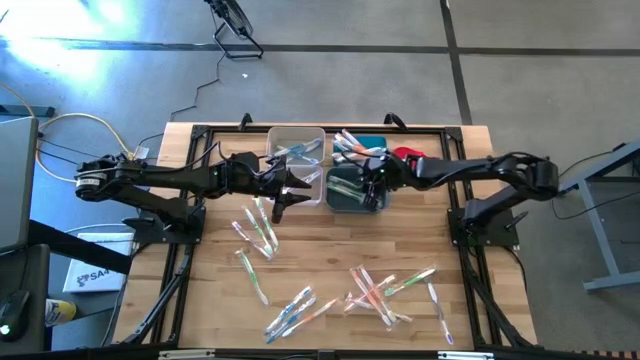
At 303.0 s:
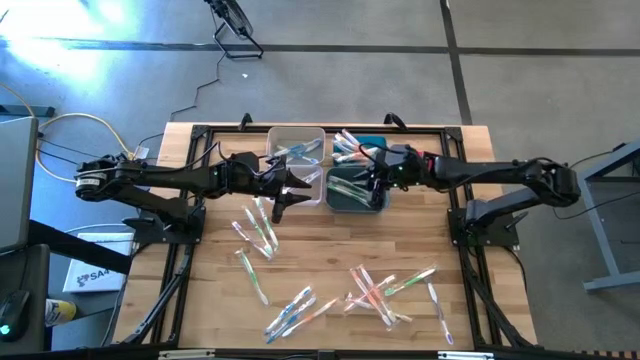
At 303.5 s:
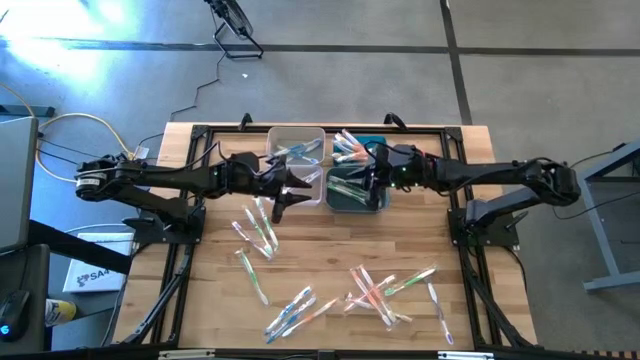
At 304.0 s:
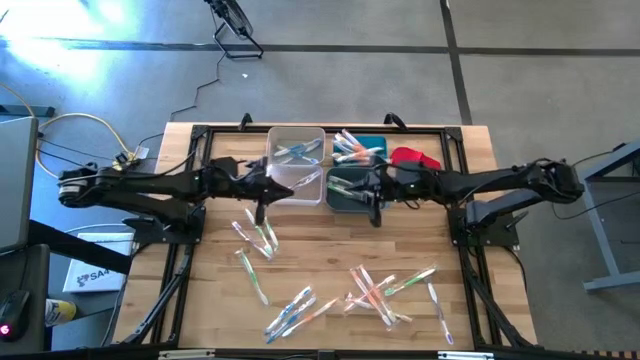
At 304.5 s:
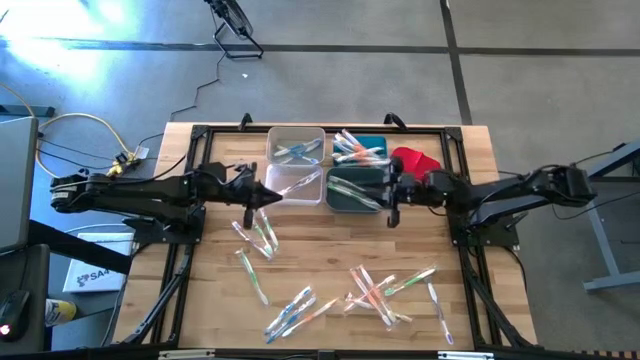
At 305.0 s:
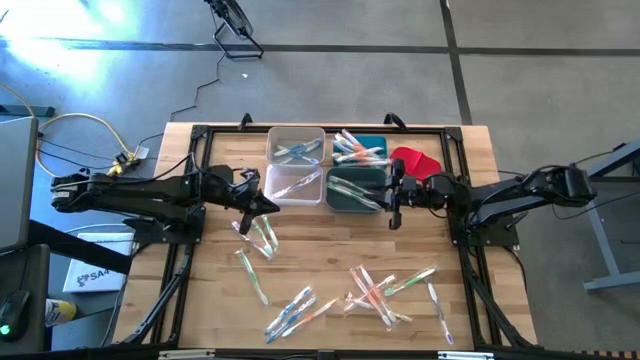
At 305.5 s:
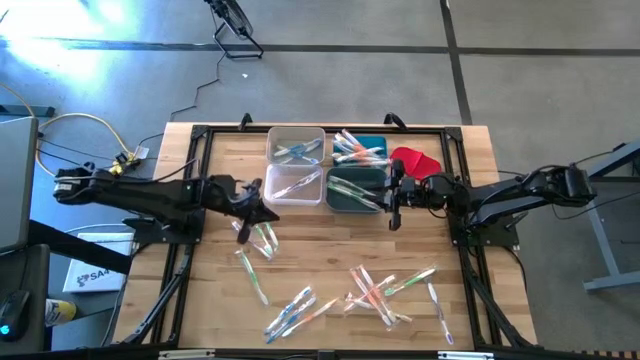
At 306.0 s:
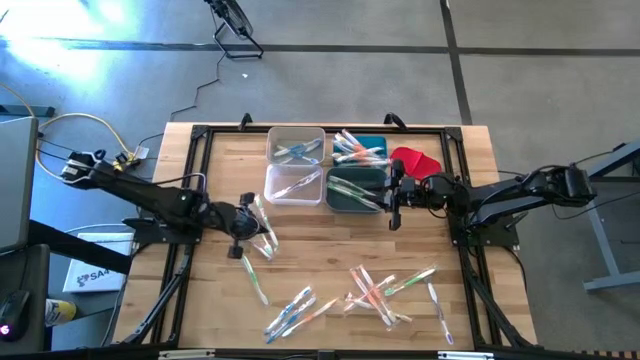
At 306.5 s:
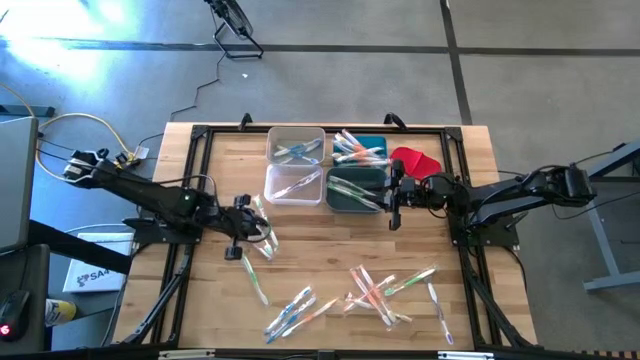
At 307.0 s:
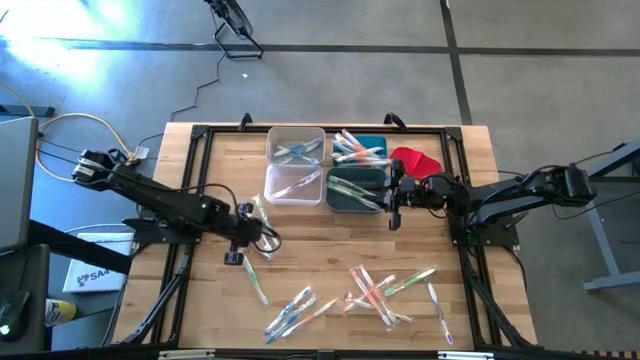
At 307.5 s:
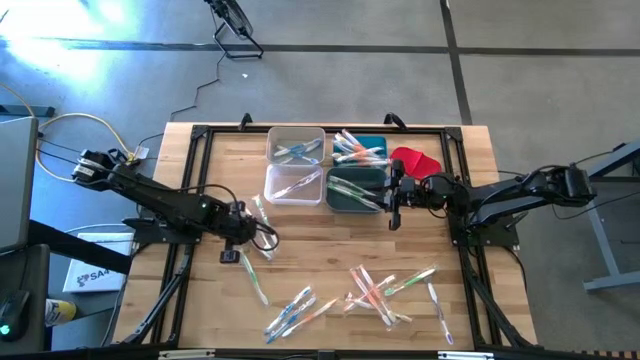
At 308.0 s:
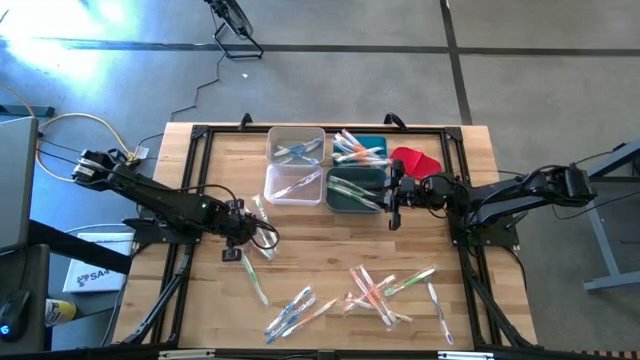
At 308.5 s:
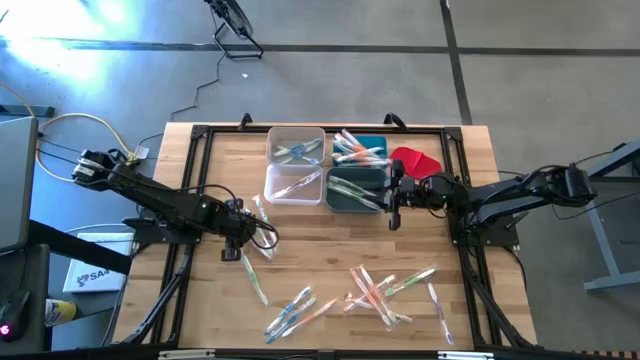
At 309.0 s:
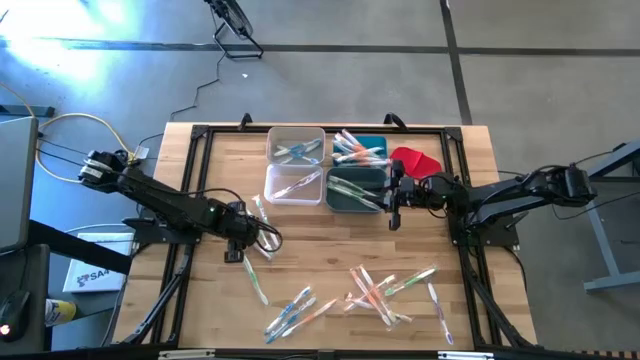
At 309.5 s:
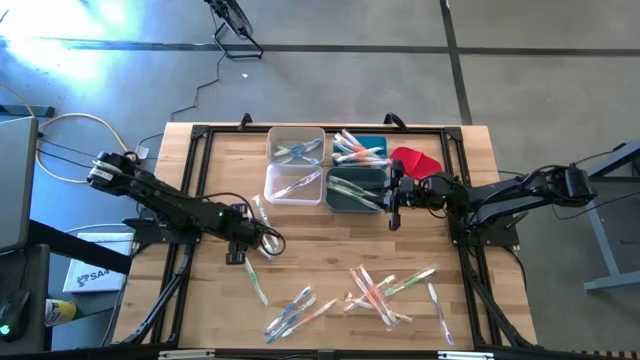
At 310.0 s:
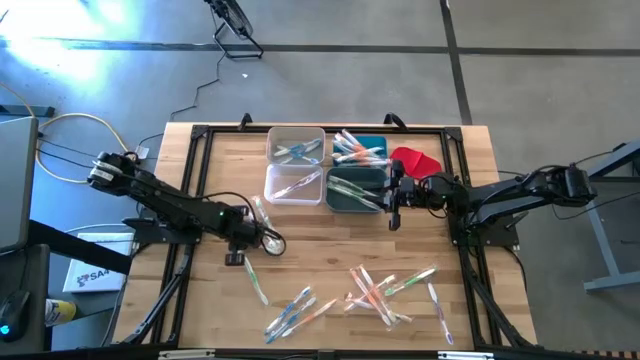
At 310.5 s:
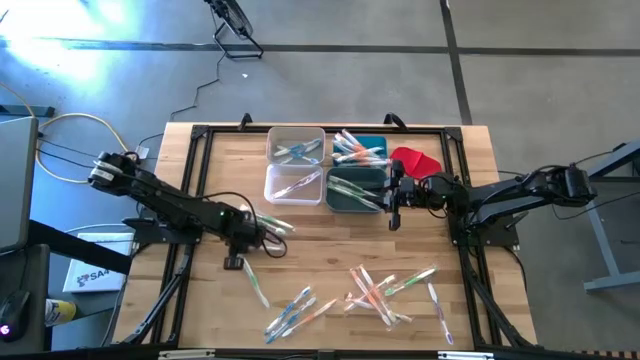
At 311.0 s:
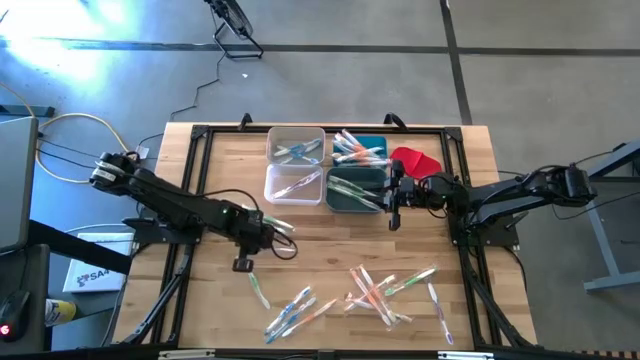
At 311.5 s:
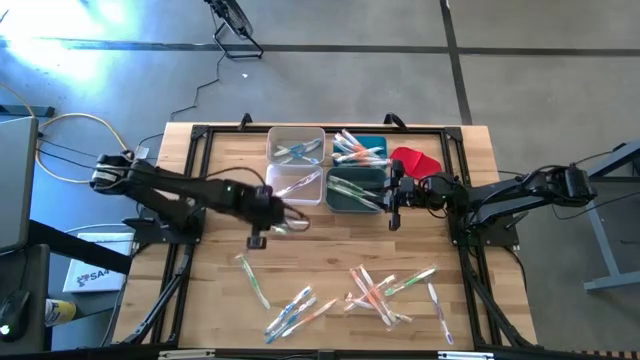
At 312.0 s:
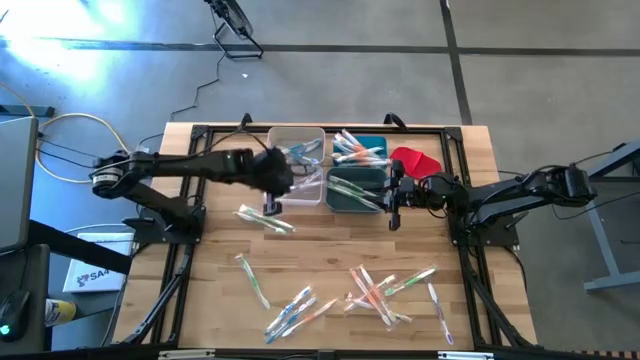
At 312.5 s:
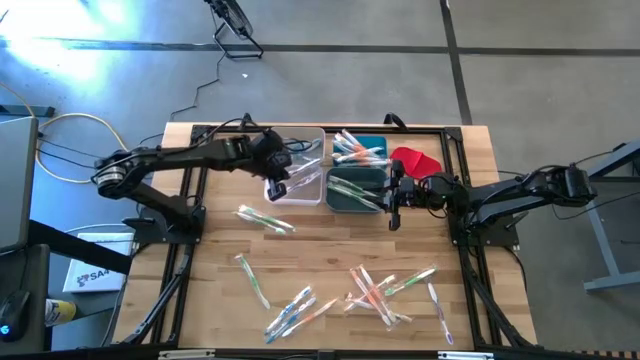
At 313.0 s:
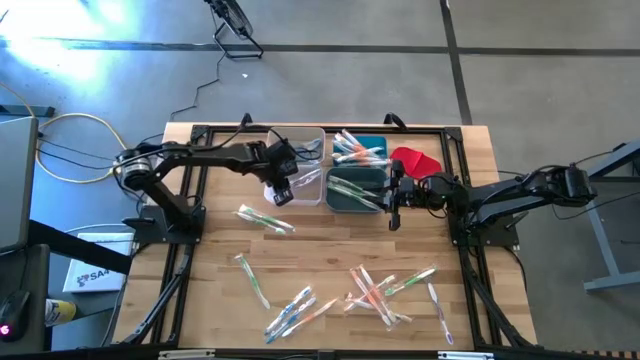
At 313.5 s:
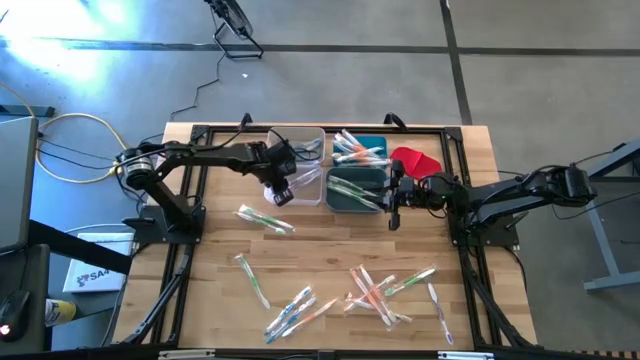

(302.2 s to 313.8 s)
Task: Pick & Place Toothbrushes
Put the purple toothbrush into the transparent bin

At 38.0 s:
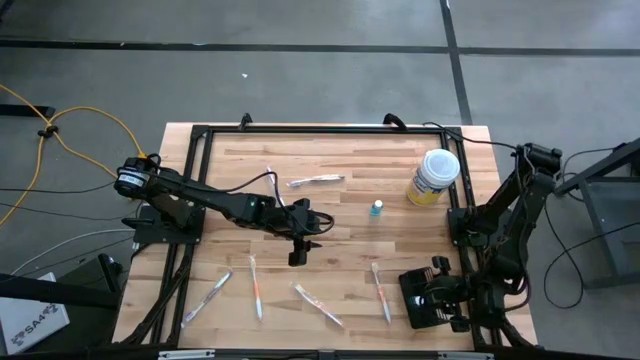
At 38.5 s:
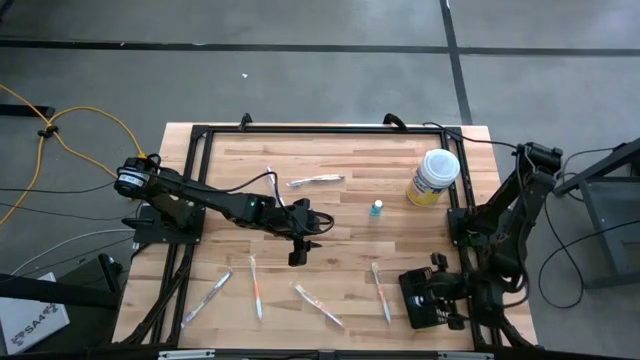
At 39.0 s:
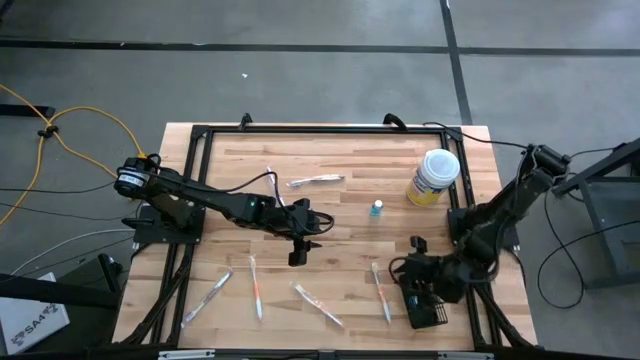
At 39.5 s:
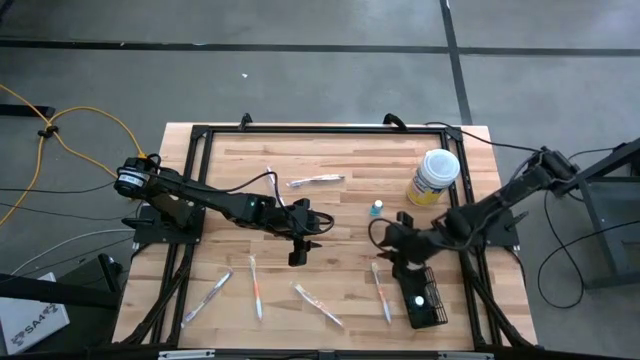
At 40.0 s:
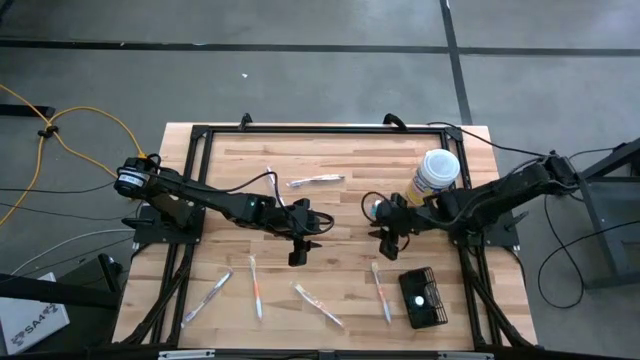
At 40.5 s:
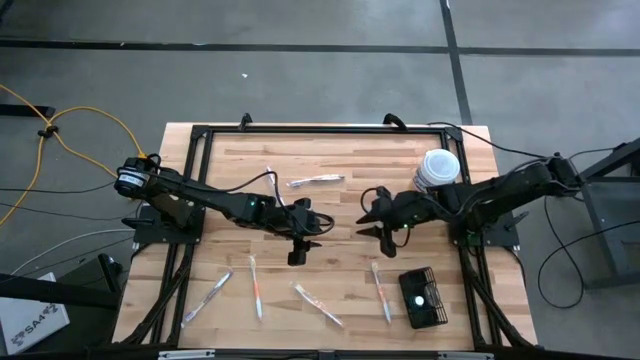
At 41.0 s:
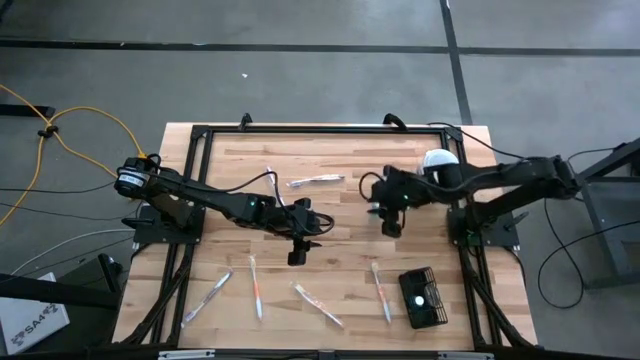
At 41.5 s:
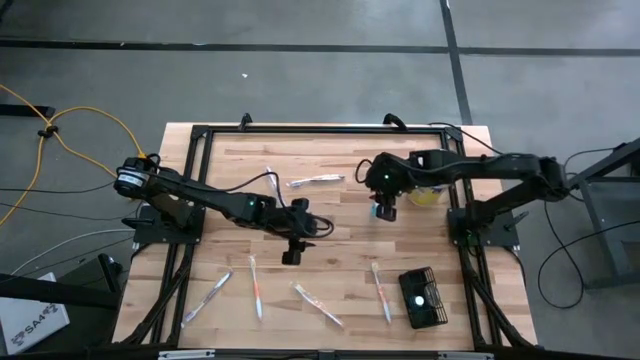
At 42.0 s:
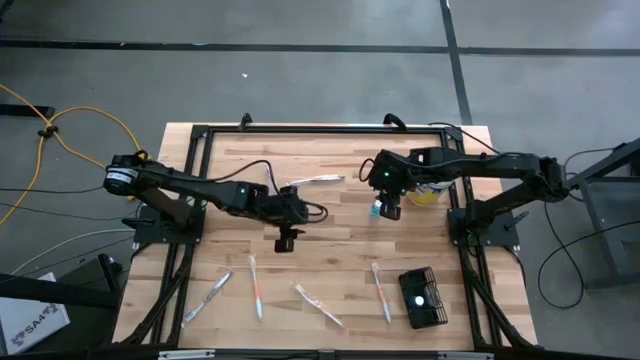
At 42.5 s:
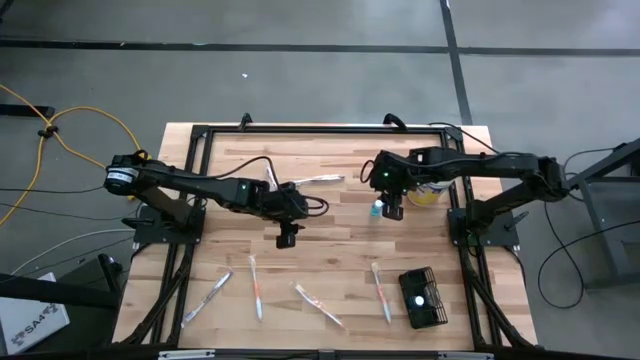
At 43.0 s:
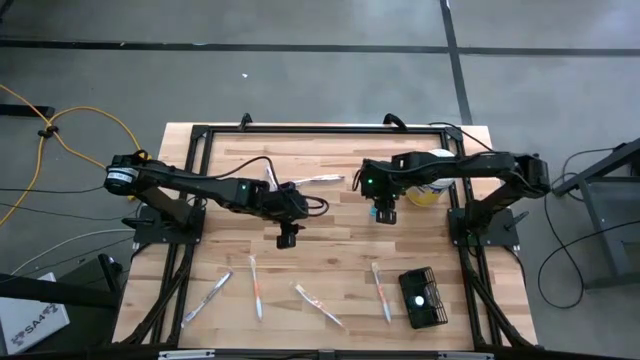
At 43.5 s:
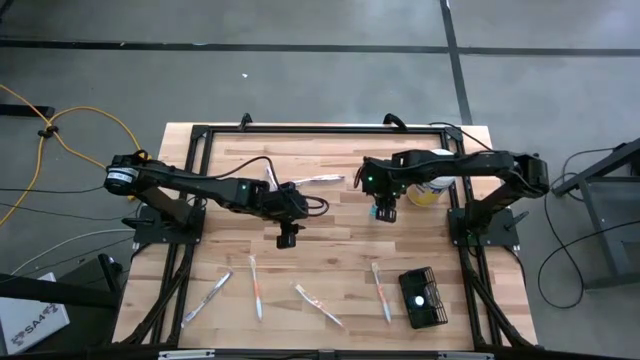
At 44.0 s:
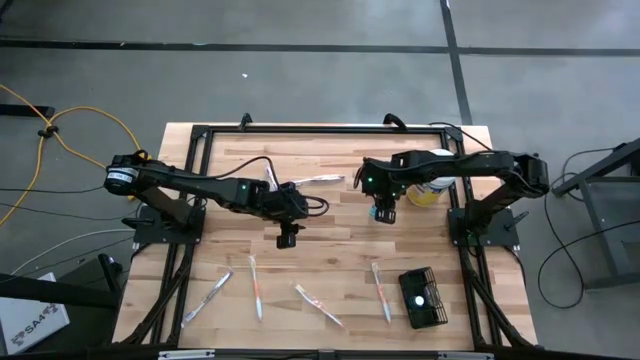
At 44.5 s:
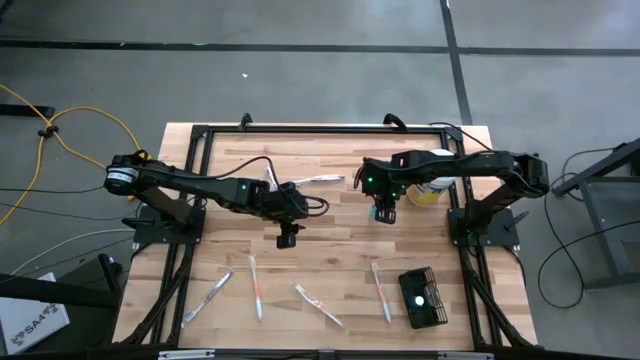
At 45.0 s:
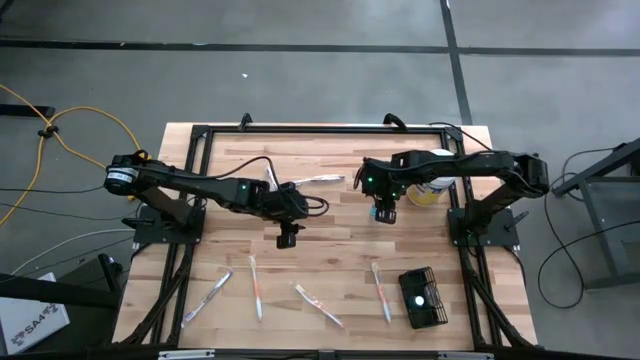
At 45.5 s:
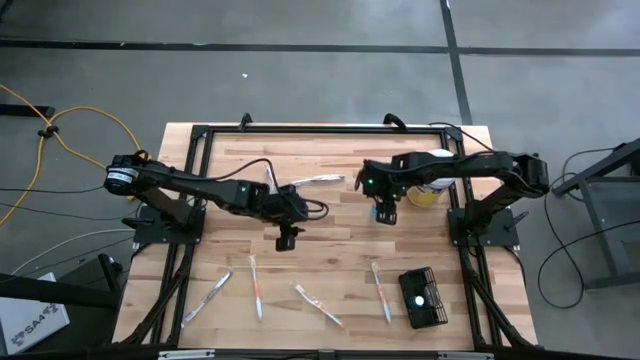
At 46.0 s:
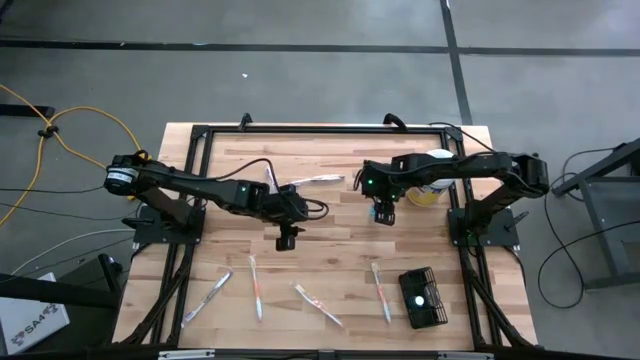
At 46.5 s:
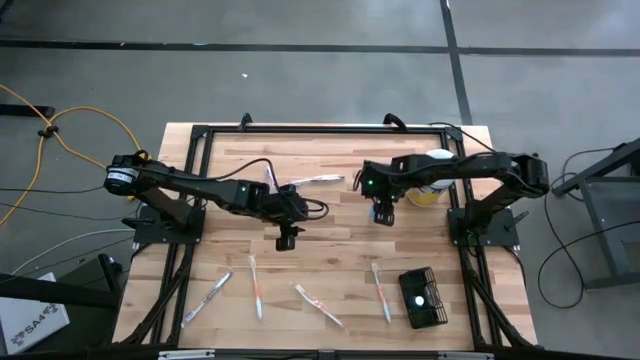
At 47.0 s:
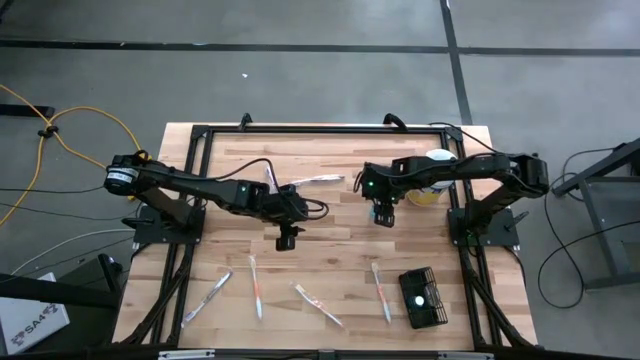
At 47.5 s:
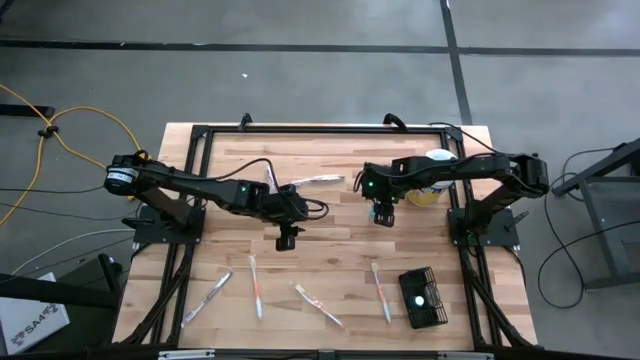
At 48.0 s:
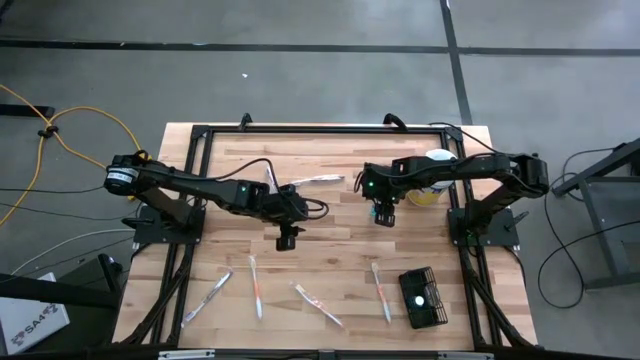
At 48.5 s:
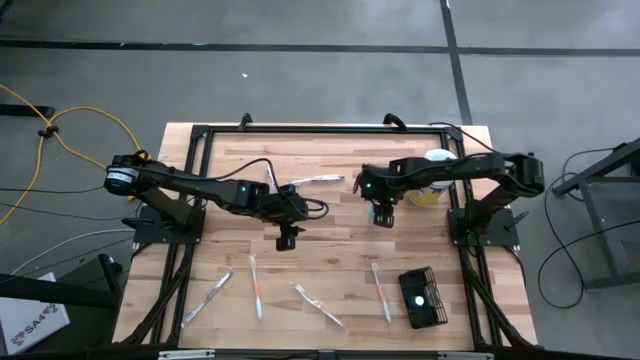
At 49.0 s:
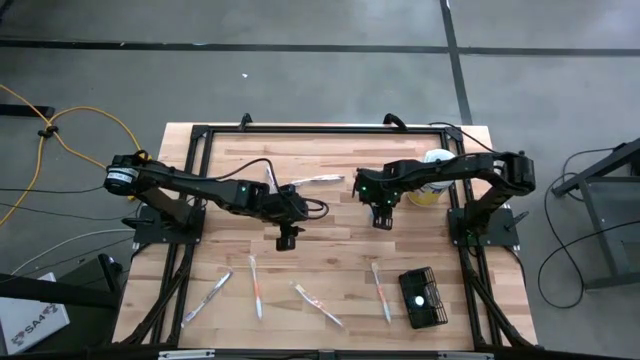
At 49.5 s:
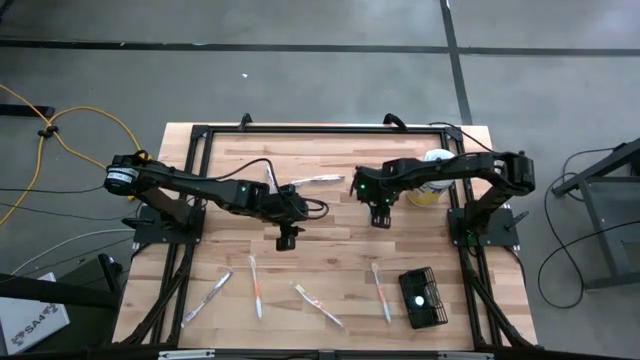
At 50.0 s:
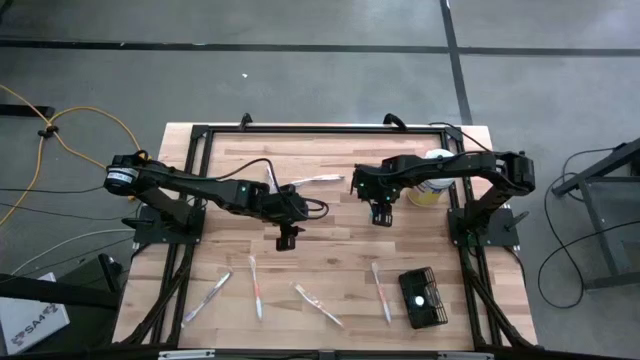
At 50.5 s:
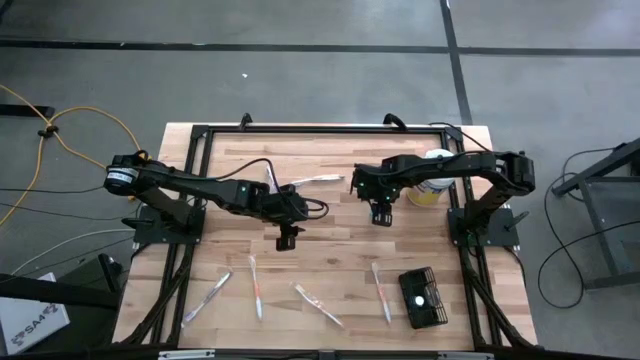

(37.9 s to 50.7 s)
Task: Pick & Place toothbrushing station
Put the blue mouthwash into the mesh organizer
